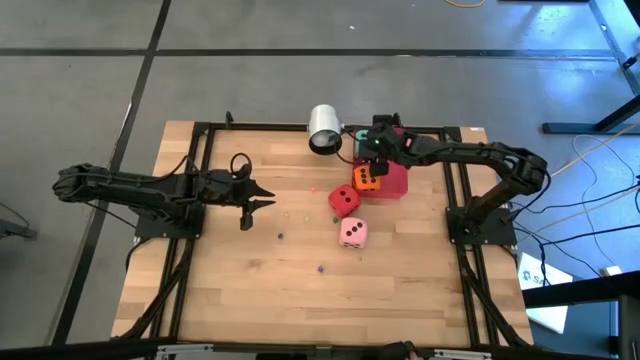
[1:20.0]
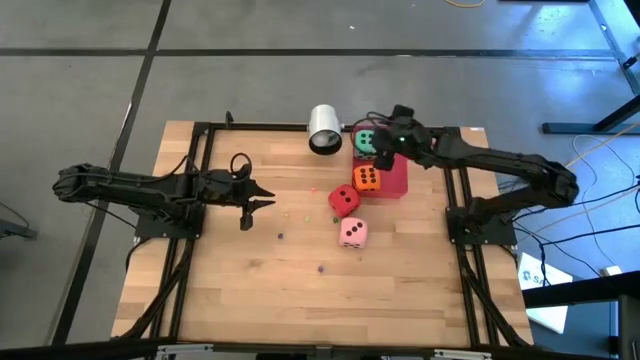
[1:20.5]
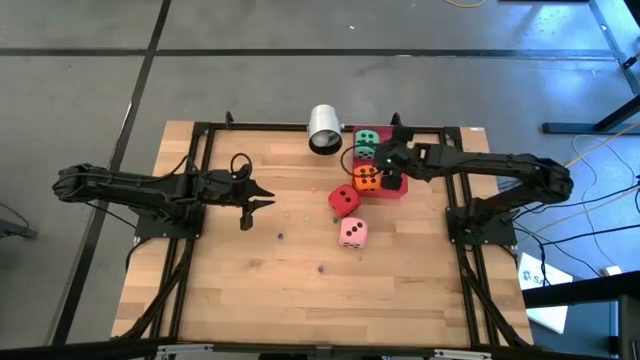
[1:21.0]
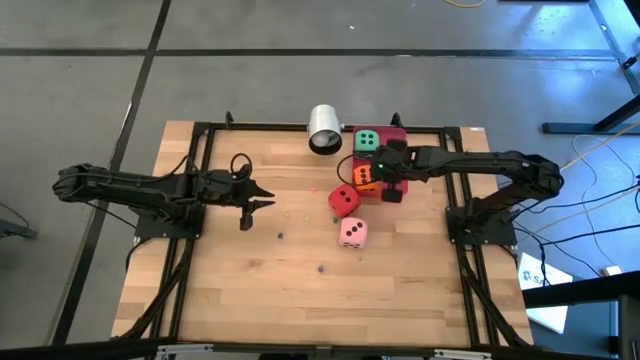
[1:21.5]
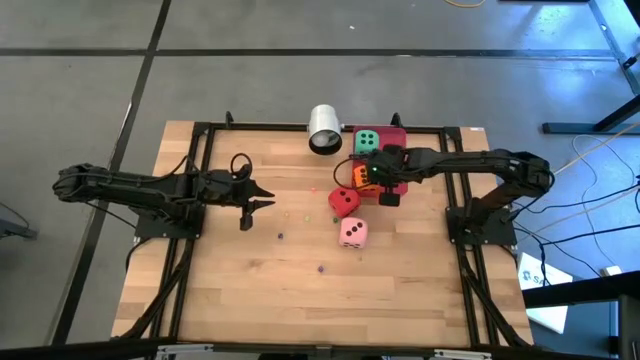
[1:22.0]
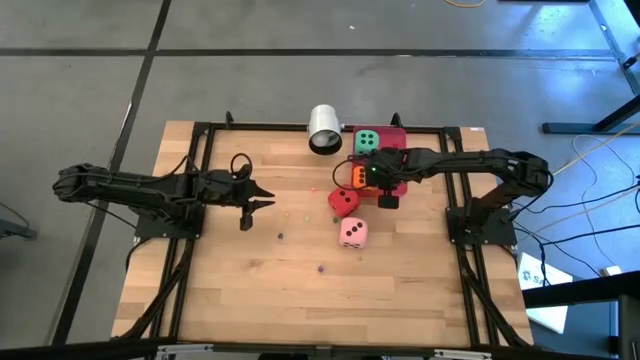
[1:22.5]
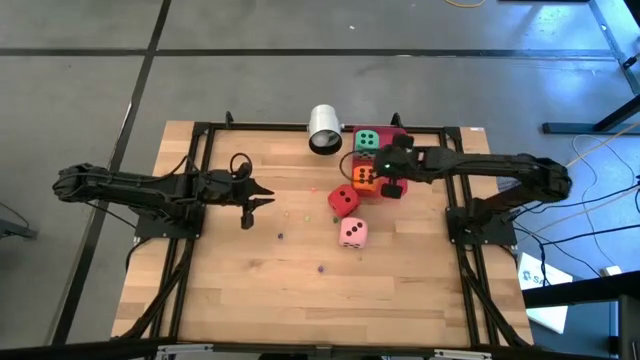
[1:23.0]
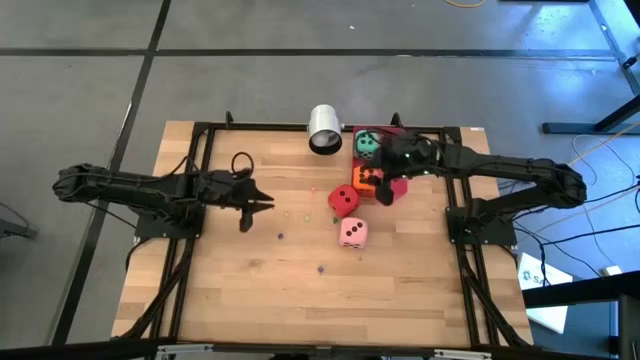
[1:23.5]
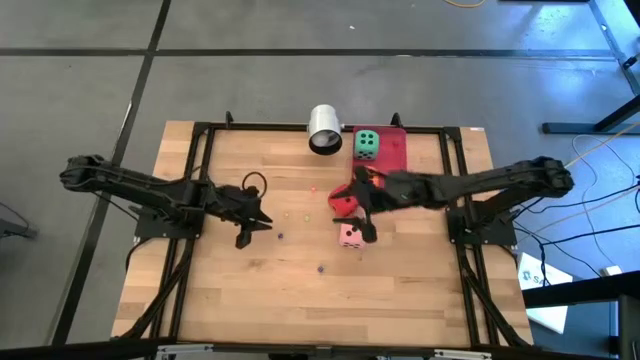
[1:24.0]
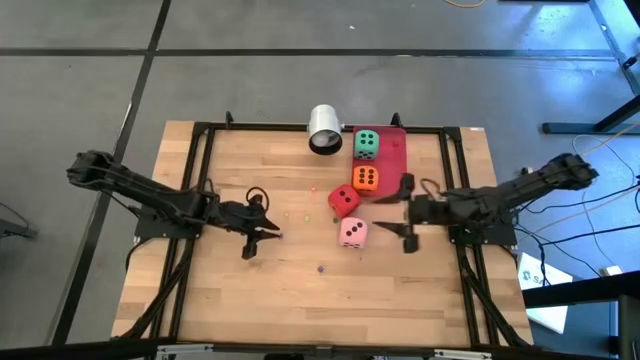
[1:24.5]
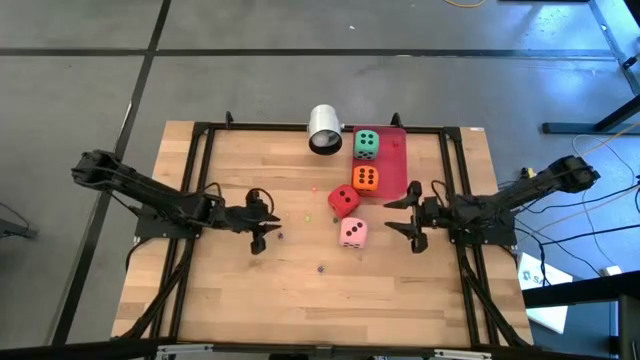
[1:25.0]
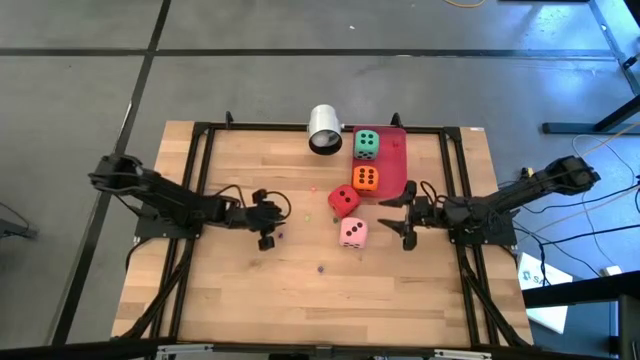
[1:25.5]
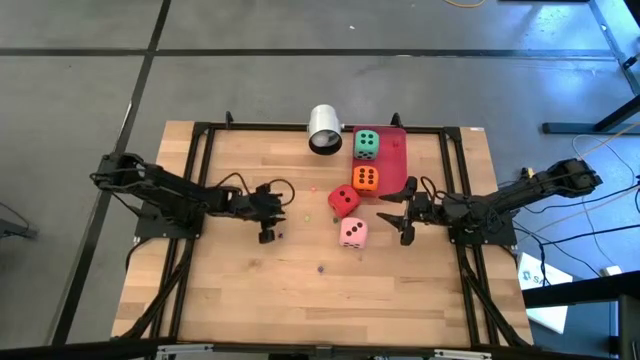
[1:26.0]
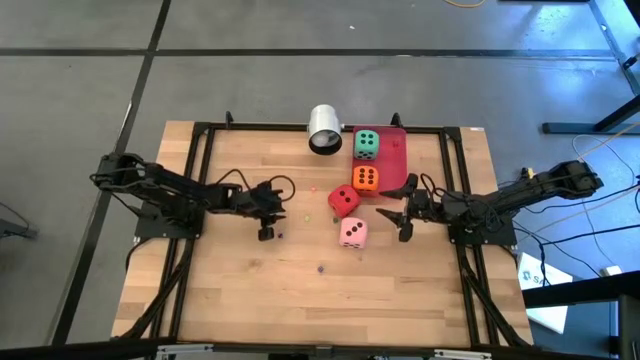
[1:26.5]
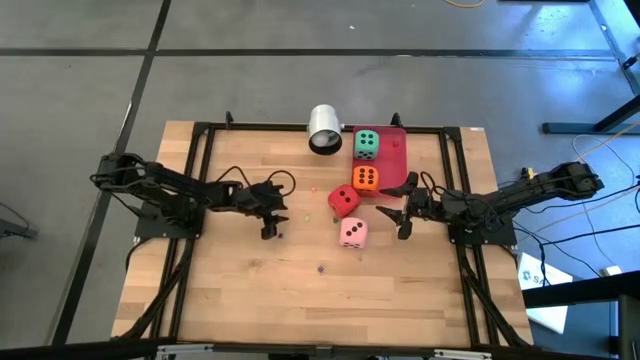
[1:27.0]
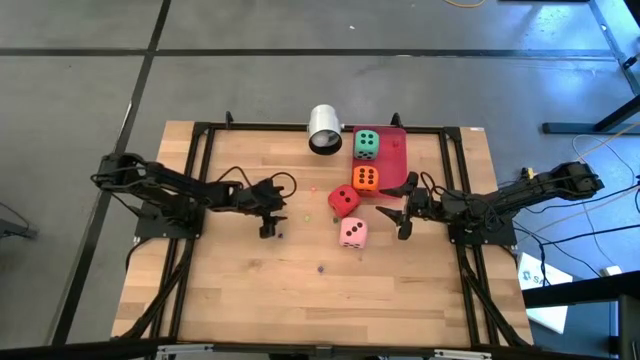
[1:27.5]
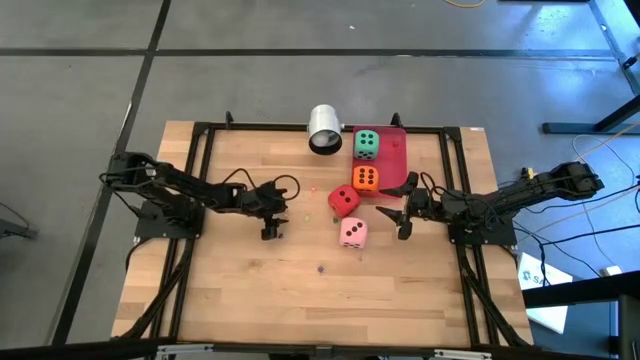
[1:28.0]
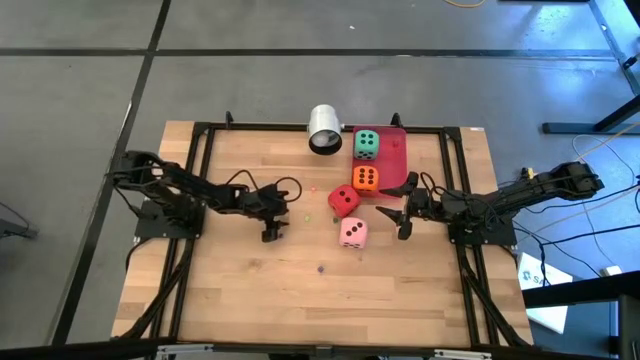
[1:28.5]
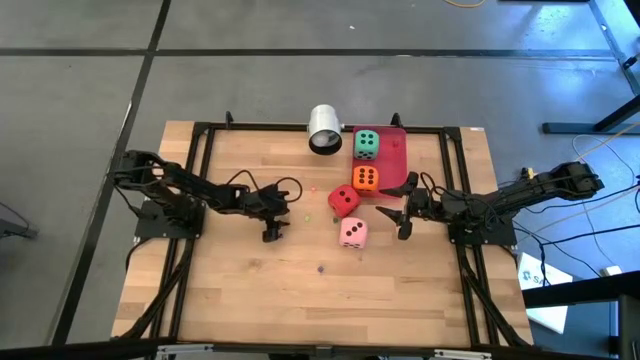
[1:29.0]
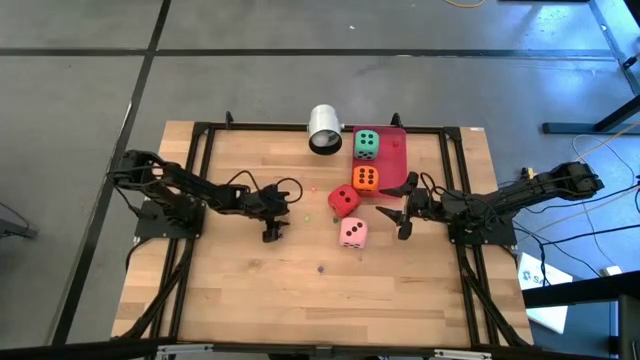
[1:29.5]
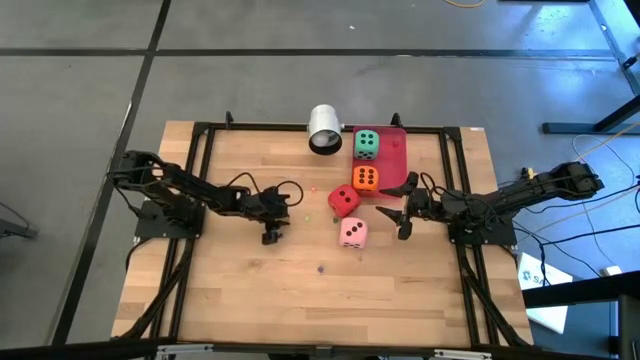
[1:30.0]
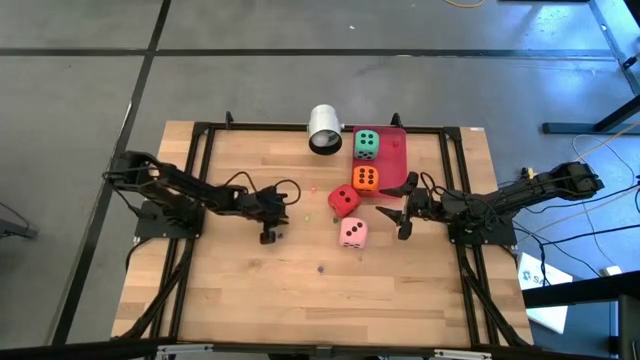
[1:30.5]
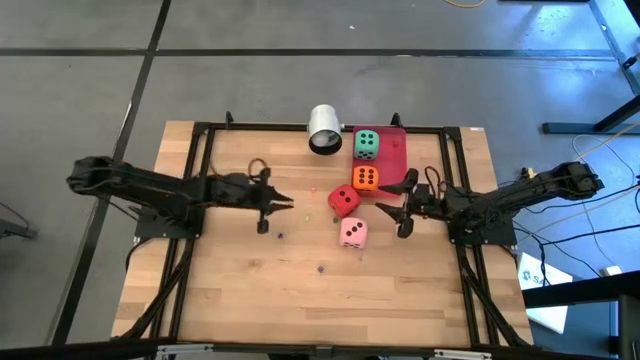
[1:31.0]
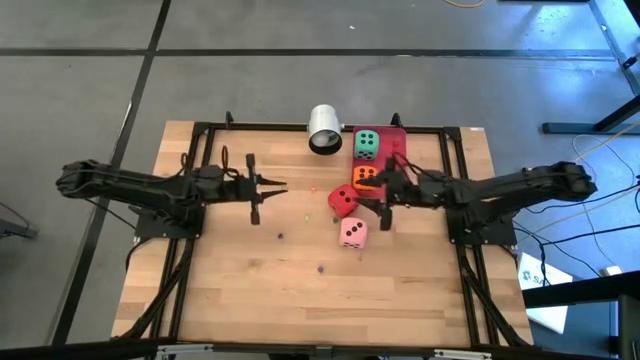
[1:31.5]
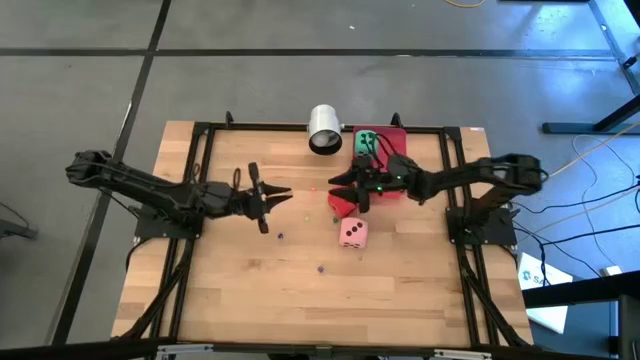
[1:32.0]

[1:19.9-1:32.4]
Task: Pick & Place Dice
Put the small yellow dice into the red bin

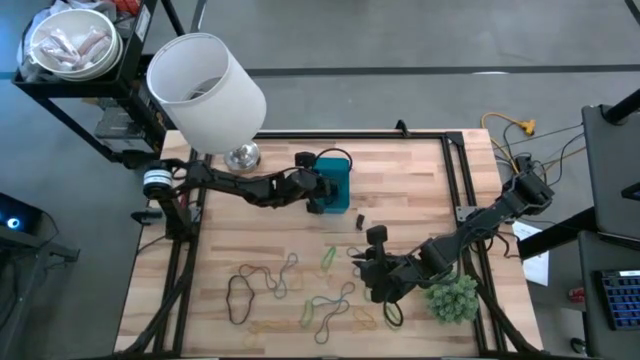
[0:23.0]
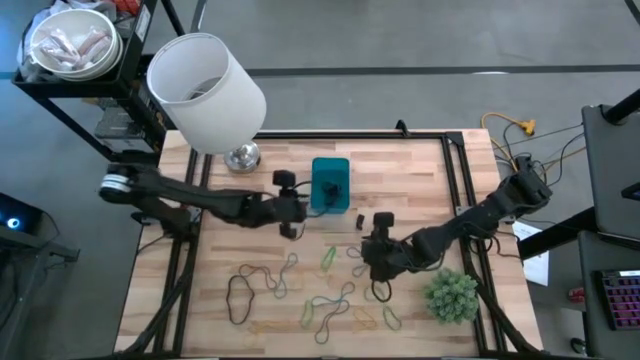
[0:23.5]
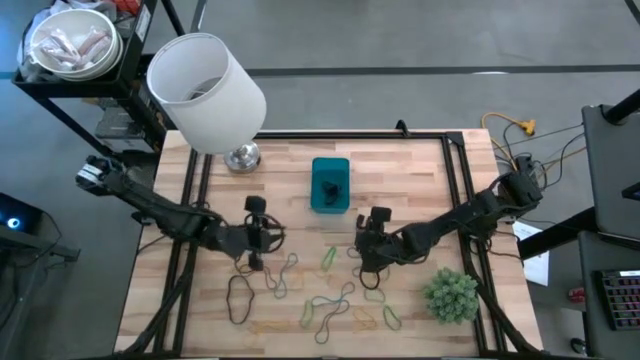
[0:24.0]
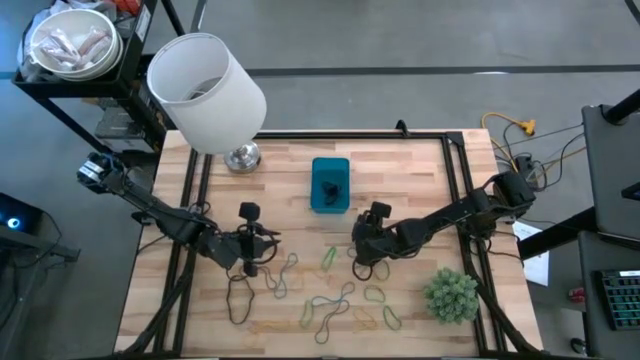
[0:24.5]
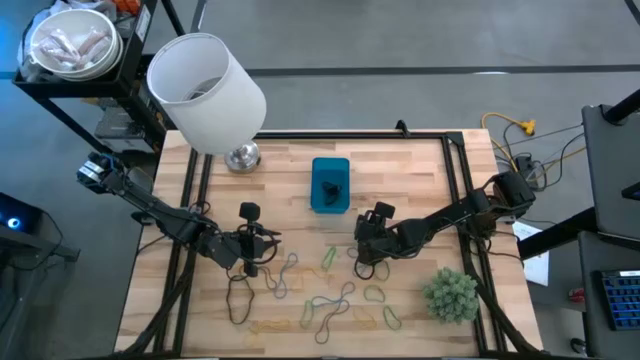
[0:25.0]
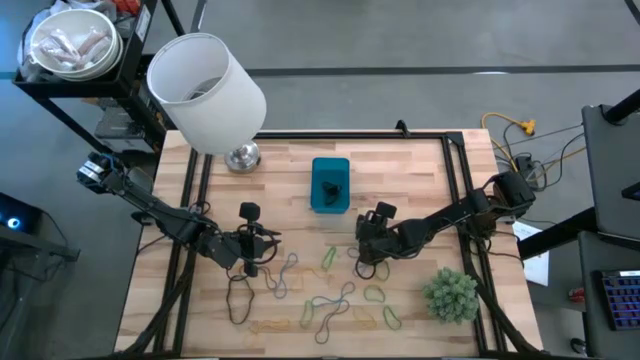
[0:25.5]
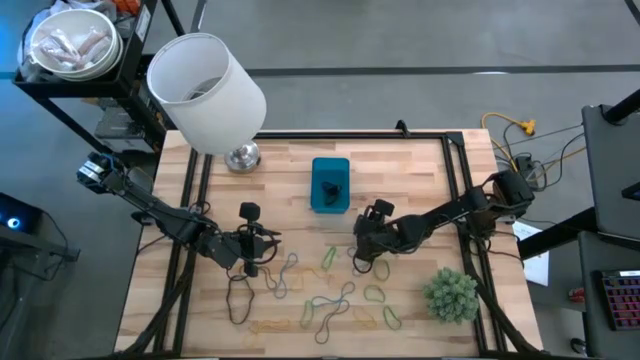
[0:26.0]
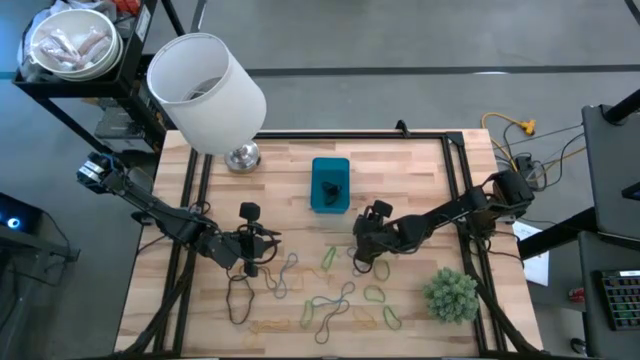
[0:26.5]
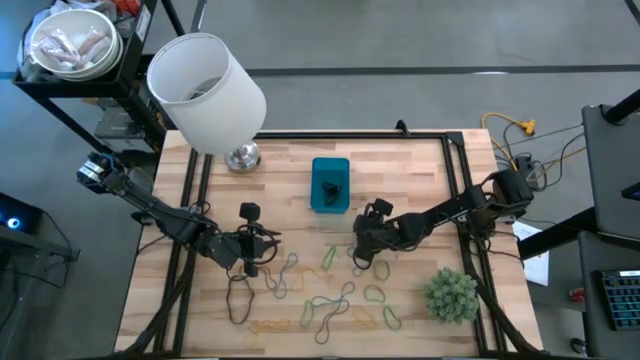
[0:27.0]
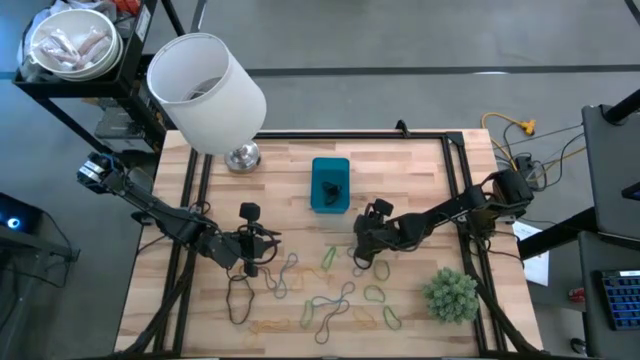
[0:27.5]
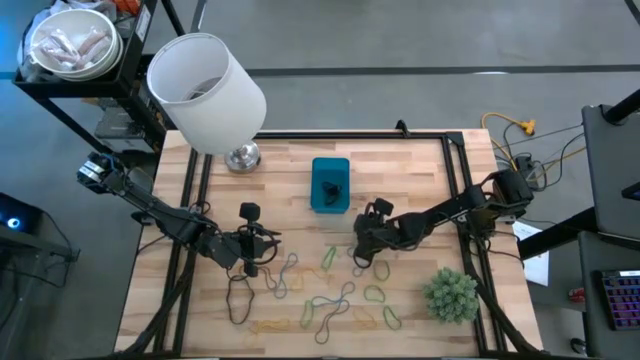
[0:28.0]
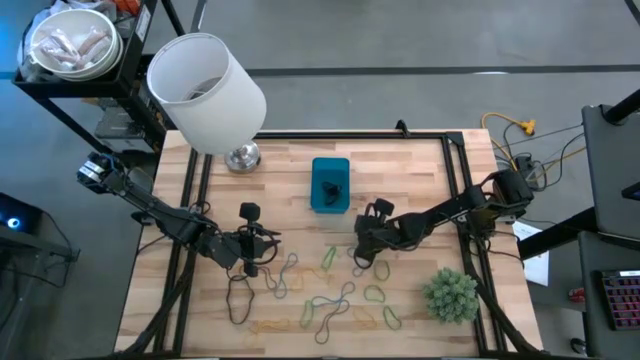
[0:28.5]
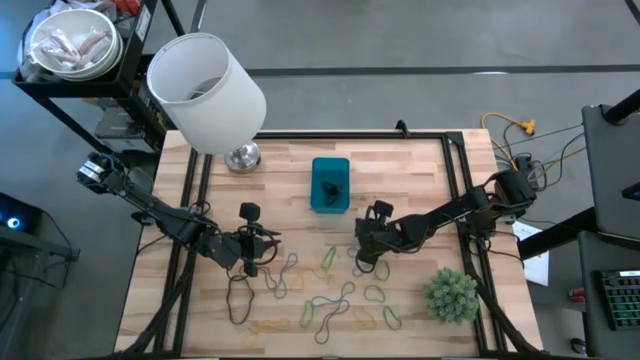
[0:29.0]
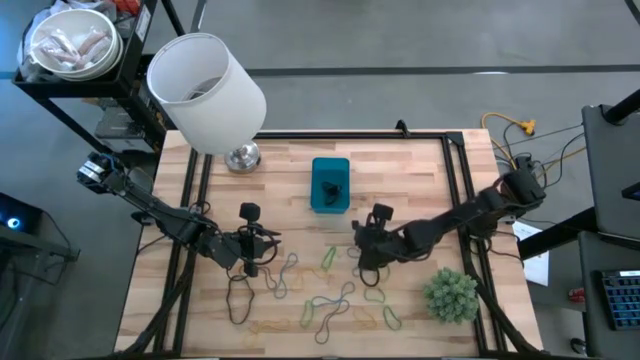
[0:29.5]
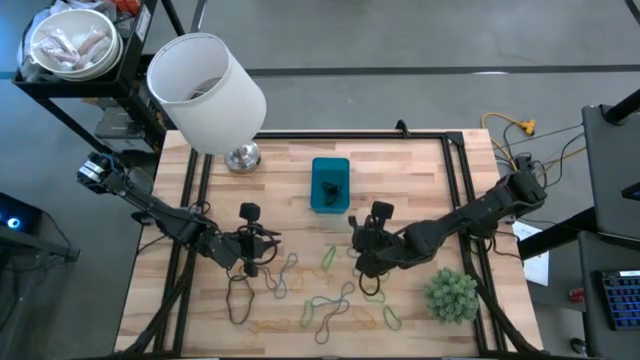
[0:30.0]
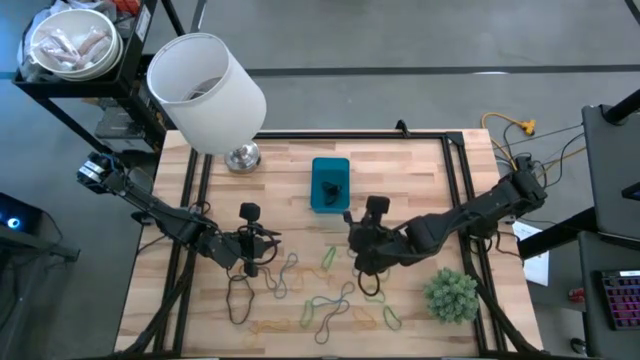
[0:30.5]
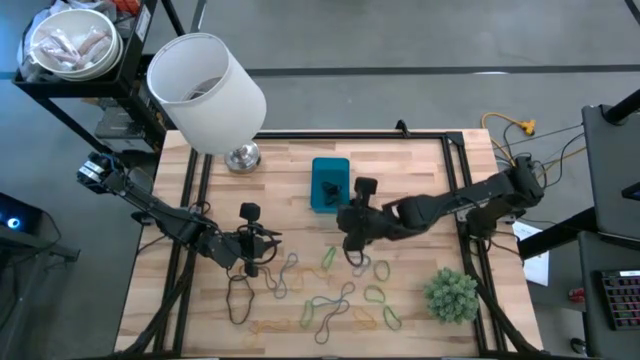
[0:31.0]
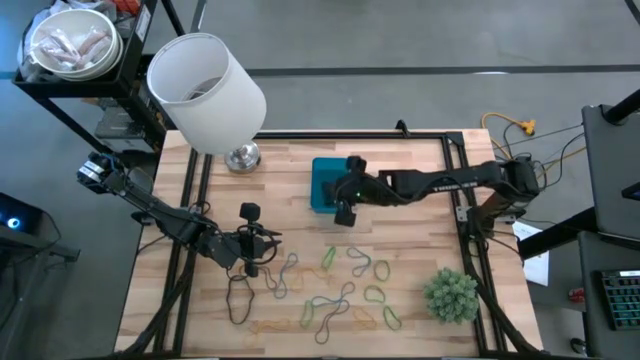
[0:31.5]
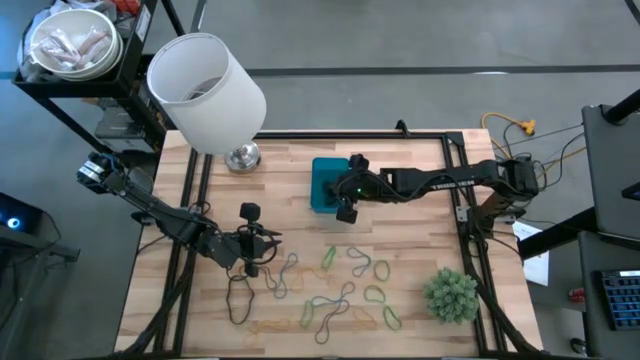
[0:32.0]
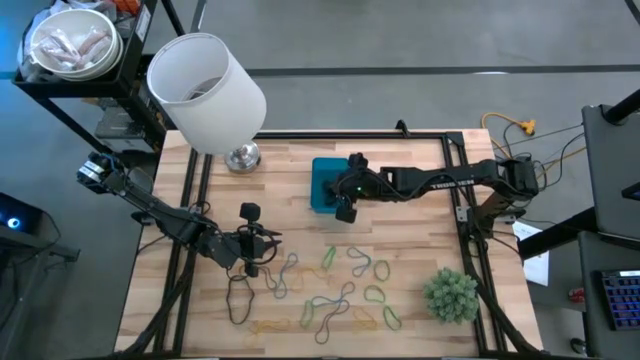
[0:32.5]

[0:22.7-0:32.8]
Task: Pick and place rubber bands into bin
Put the black rubber band into the blue bin
